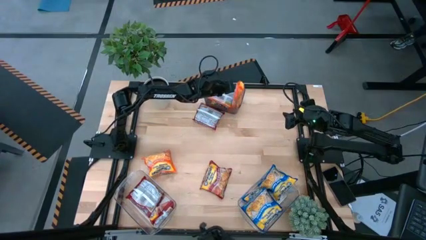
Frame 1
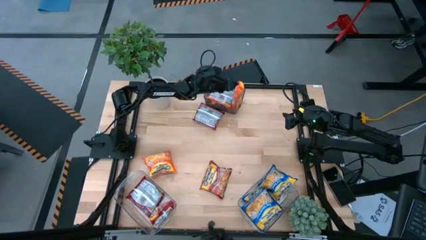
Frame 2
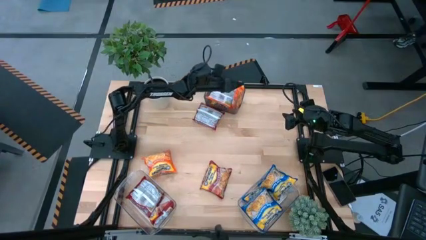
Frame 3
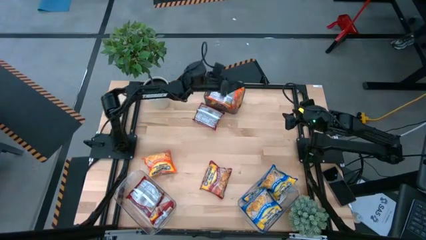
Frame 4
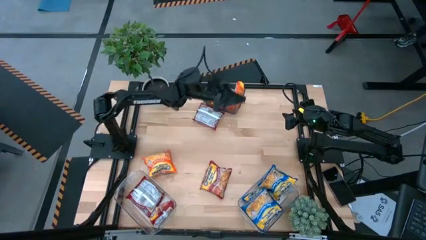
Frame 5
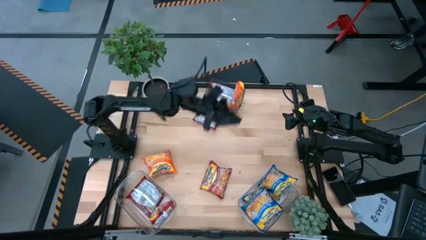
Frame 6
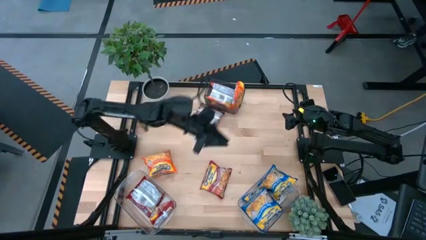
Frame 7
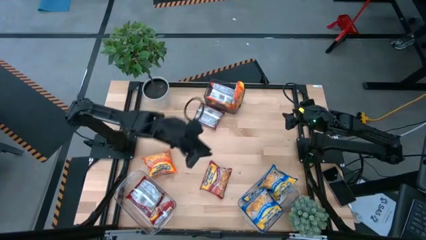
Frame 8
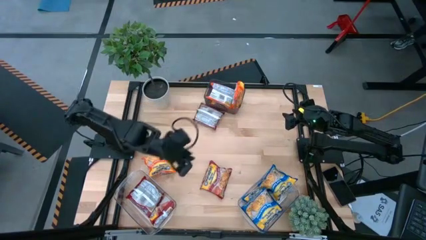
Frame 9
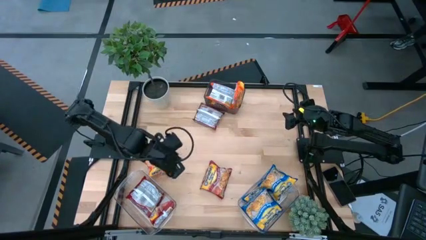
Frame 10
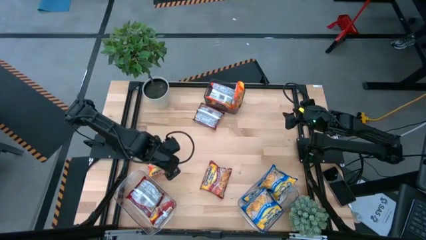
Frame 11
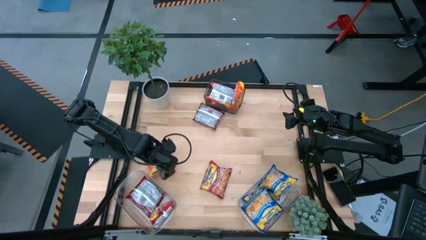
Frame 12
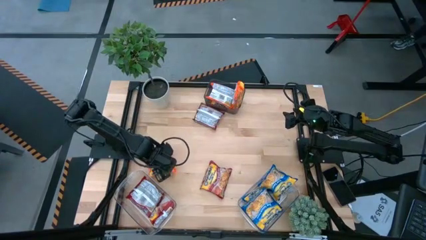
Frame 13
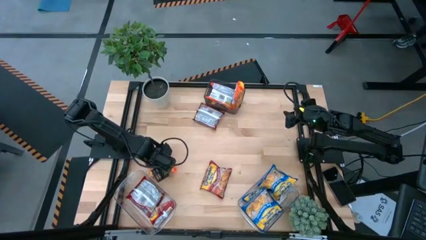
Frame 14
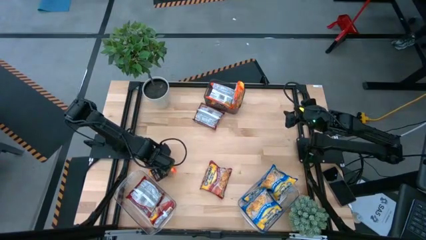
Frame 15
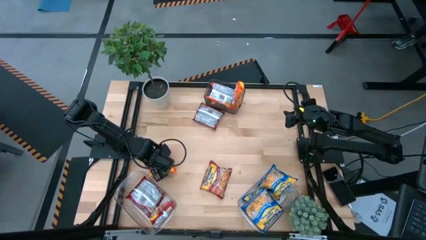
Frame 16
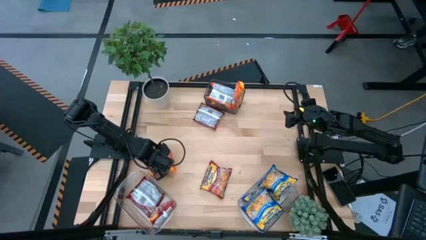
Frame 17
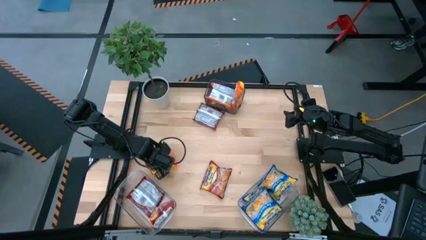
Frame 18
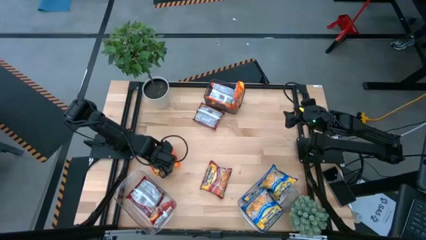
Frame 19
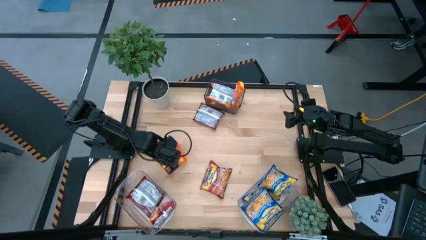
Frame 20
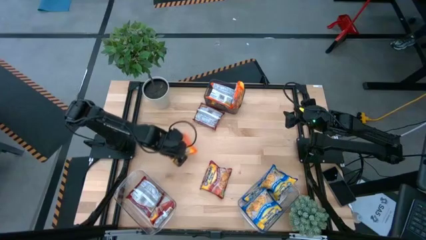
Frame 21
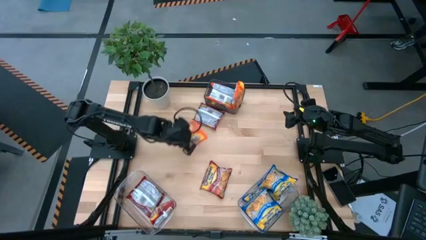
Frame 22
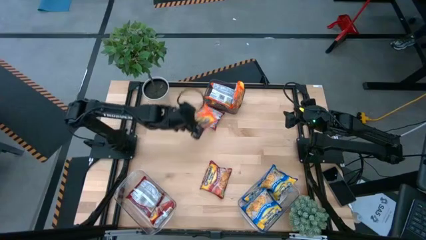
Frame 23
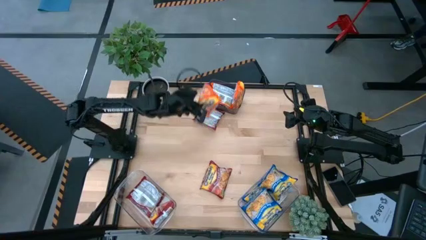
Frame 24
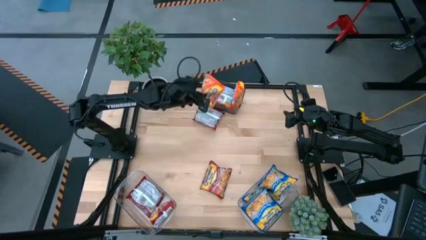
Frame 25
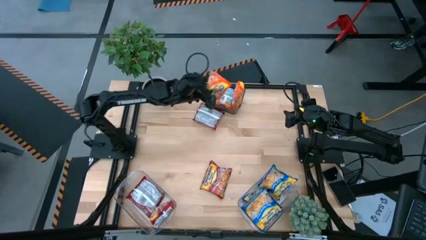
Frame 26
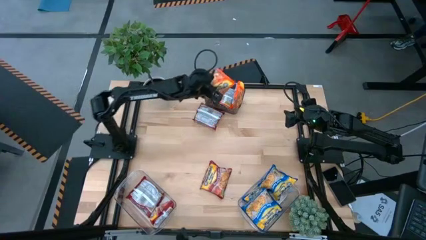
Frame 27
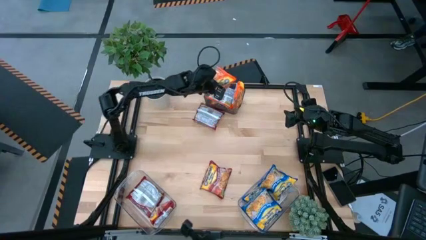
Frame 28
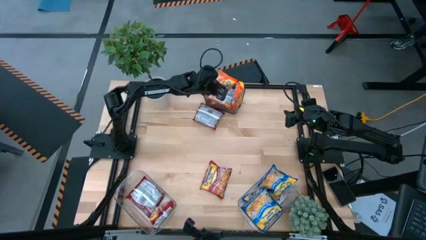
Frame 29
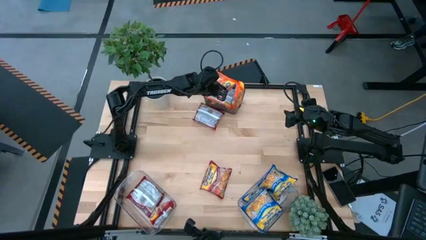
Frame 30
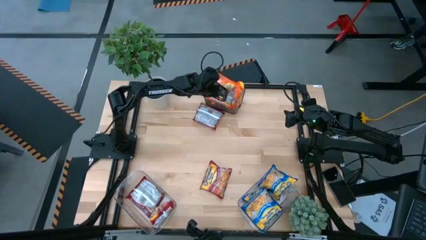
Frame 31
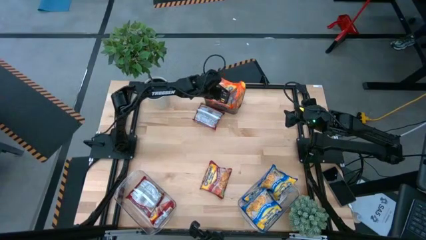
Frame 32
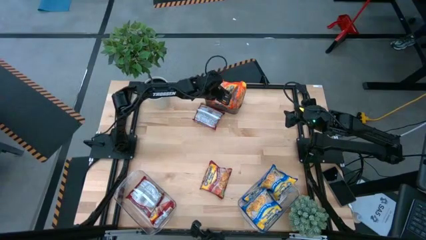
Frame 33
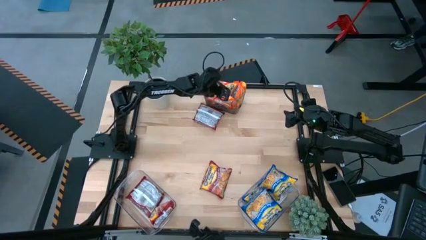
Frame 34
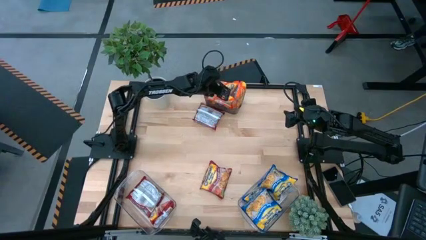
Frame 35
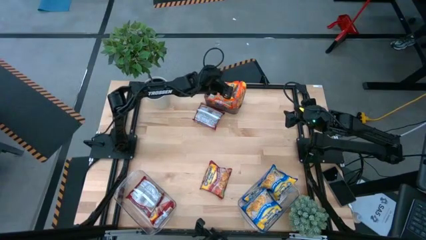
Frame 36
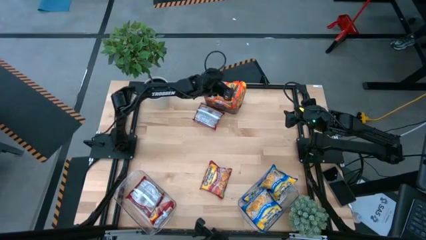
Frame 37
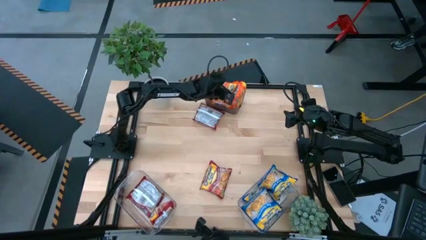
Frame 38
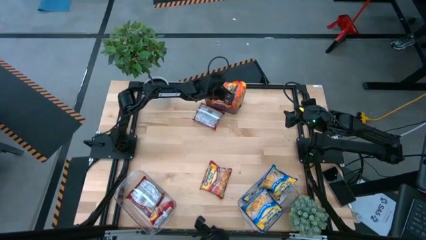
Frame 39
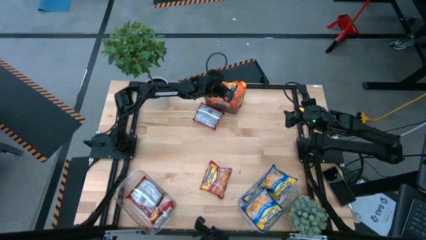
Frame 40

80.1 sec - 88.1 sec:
Task: Sort Maruchan noodles
Put the orange noodle pack into the black bin

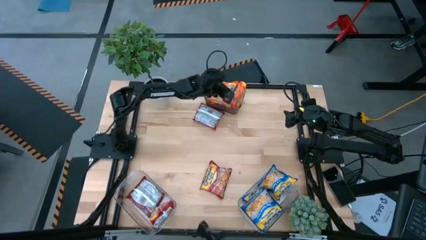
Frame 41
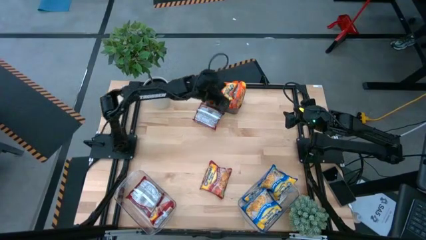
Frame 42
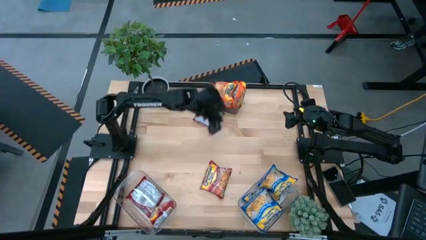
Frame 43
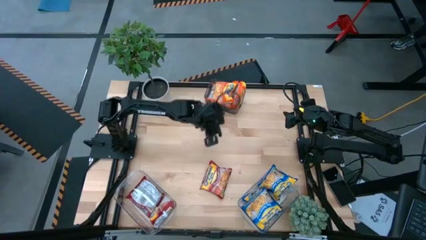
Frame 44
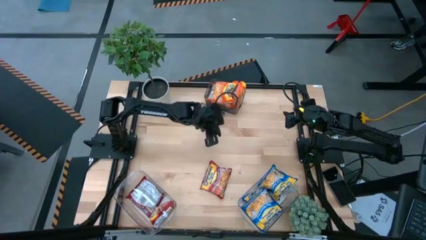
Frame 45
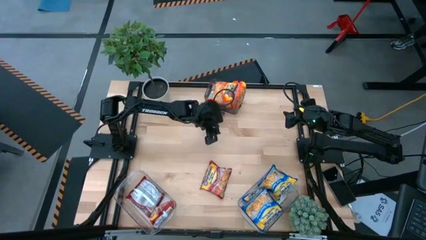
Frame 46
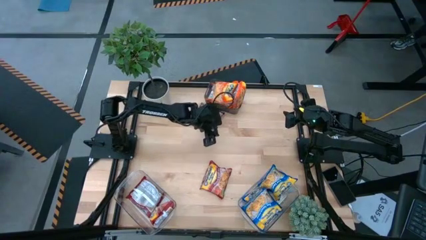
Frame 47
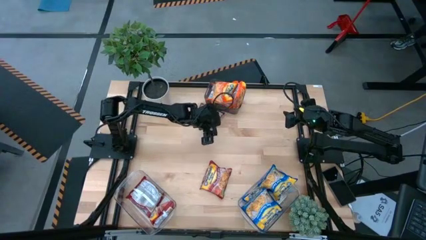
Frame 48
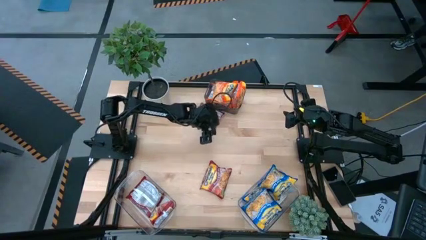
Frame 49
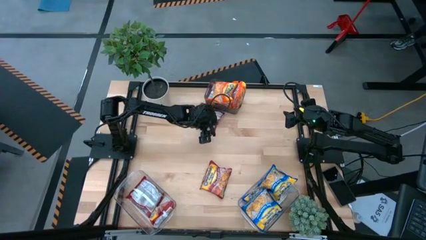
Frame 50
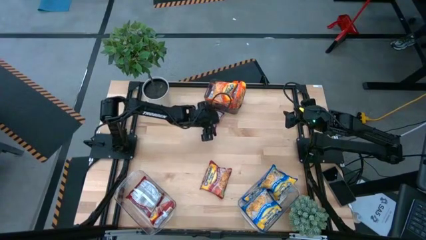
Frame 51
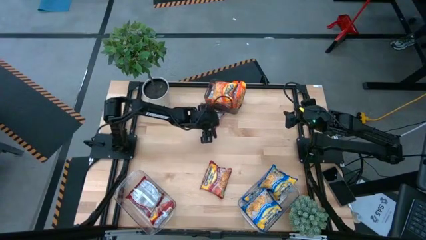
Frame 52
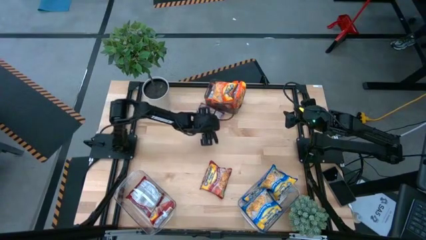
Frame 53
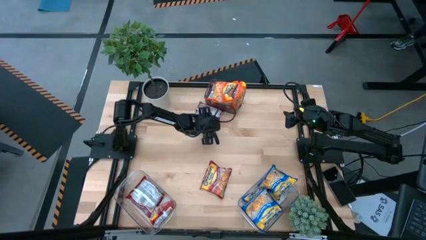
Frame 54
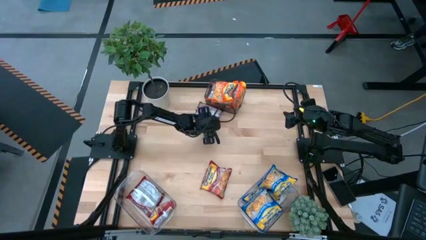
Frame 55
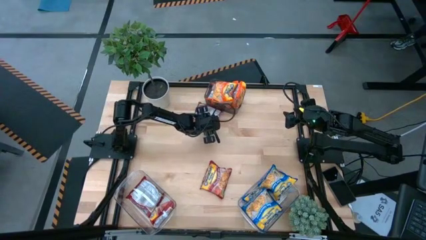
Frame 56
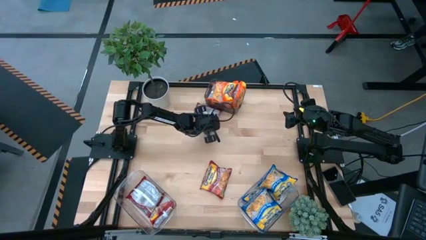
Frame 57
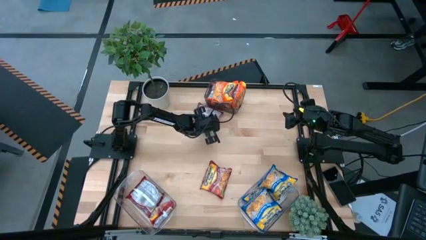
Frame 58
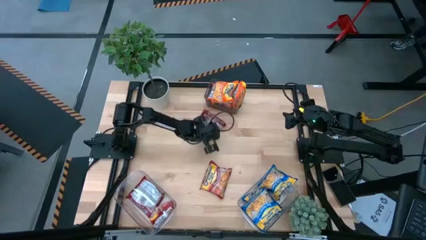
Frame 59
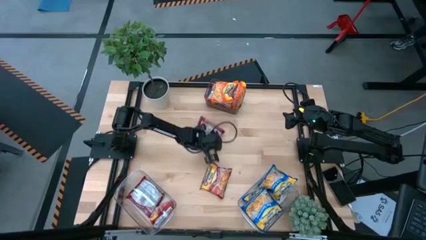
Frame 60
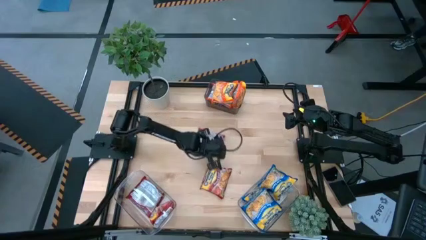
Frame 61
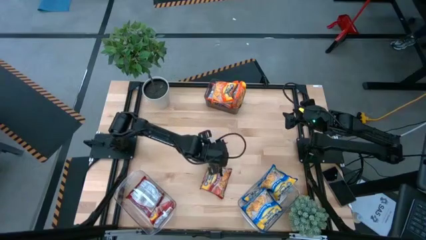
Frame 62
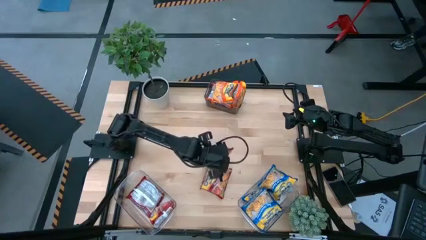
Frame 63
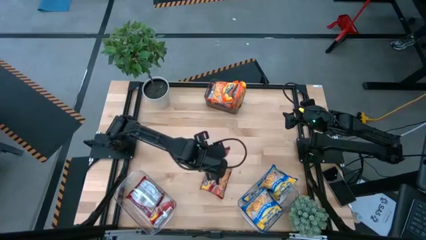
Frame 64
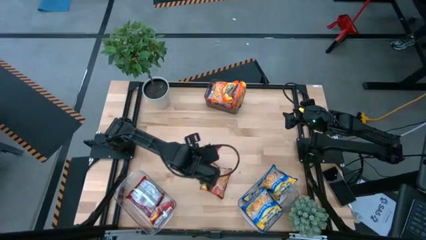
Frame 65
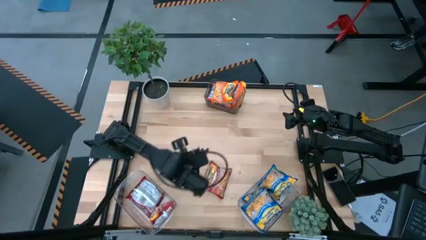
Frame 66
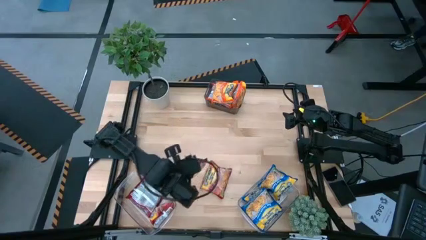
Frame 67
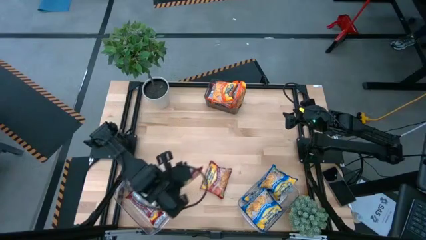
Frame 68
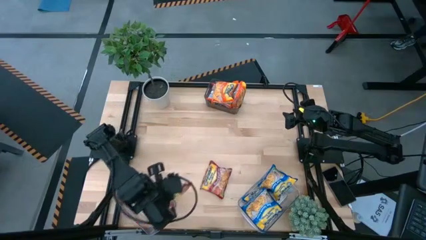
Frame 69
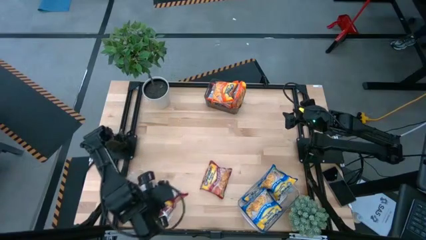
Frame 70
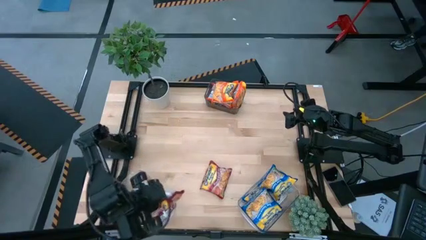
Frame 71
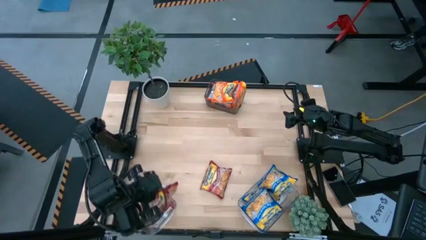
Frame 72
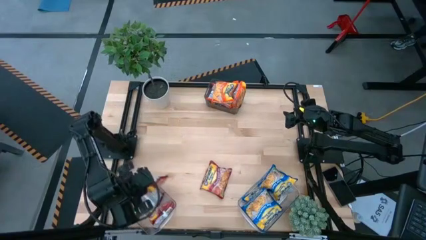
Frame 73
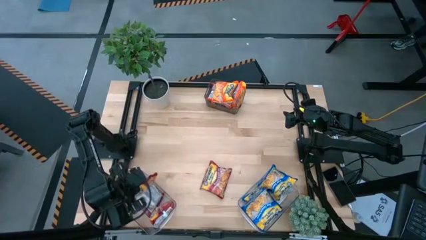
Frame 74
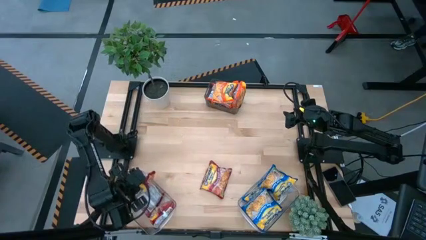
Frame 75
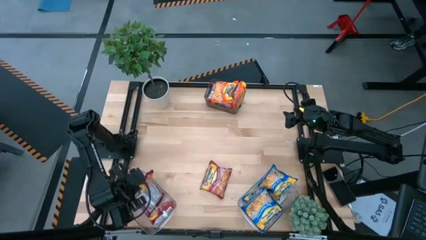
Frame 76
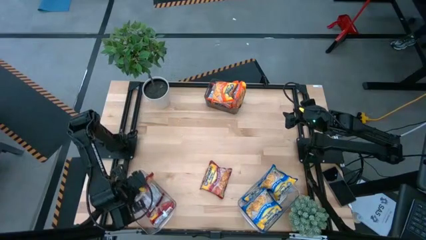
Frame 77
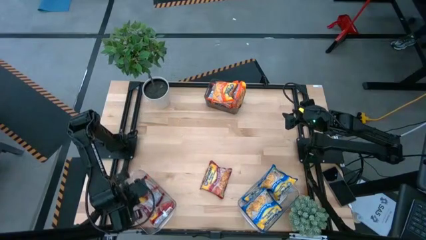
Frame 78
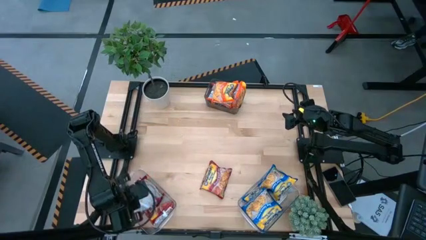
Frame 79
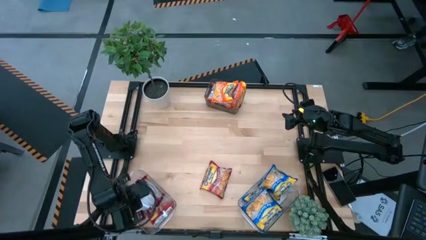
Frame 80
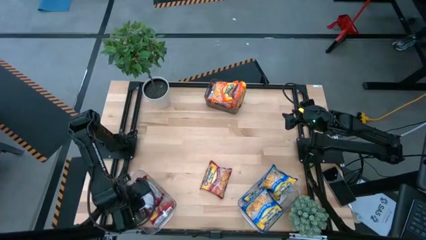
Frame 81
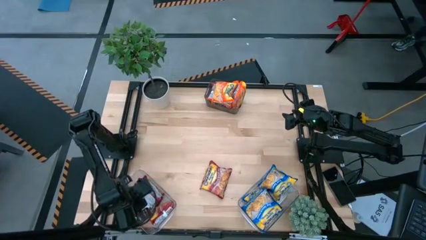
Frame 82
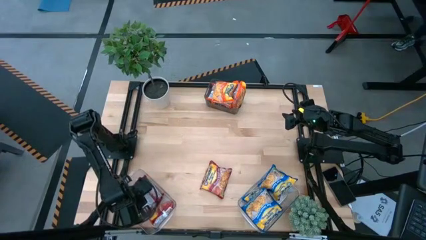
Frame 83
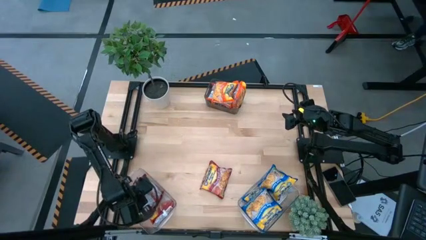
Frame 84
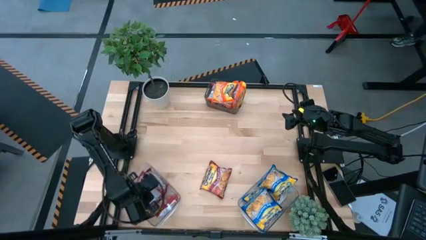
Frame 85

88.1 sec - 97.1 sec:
Put the red noodle pack into the left transparent bin
